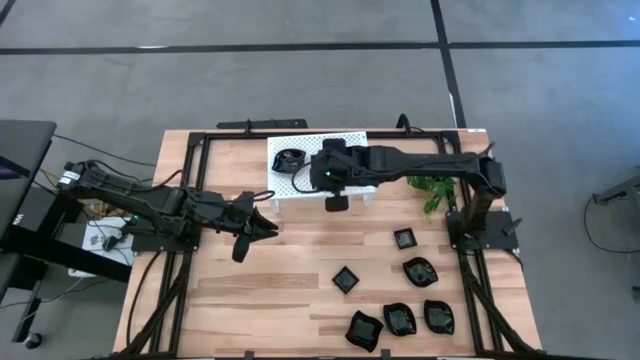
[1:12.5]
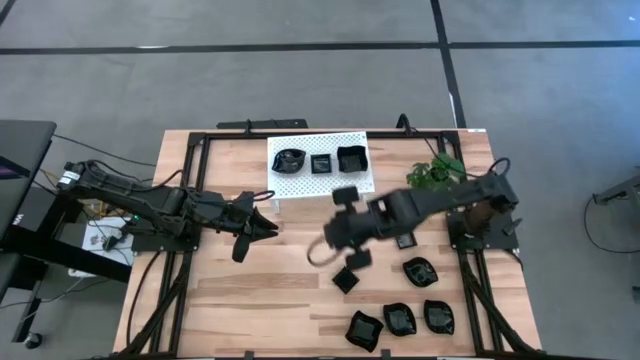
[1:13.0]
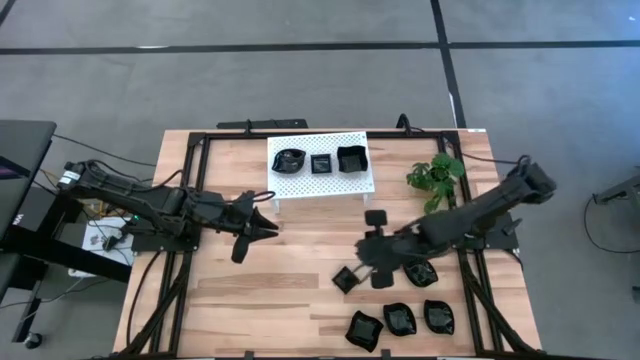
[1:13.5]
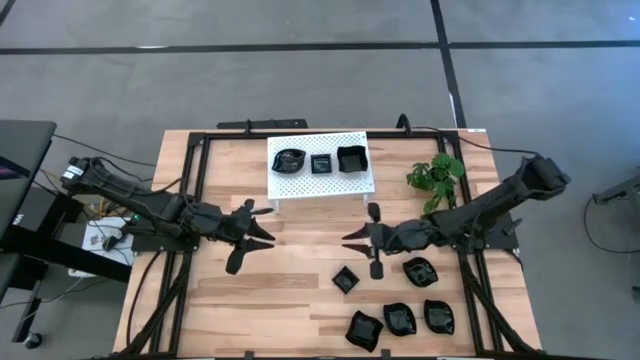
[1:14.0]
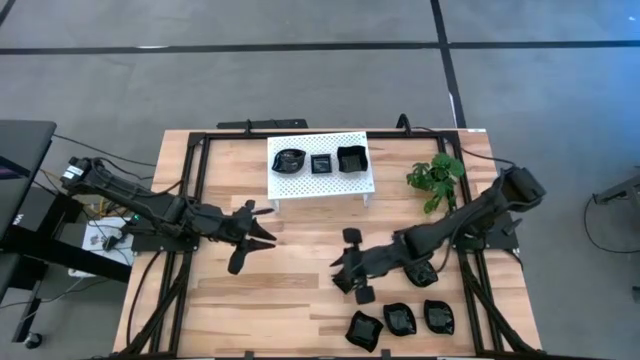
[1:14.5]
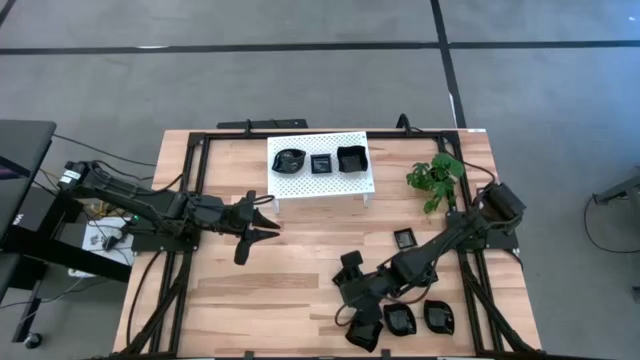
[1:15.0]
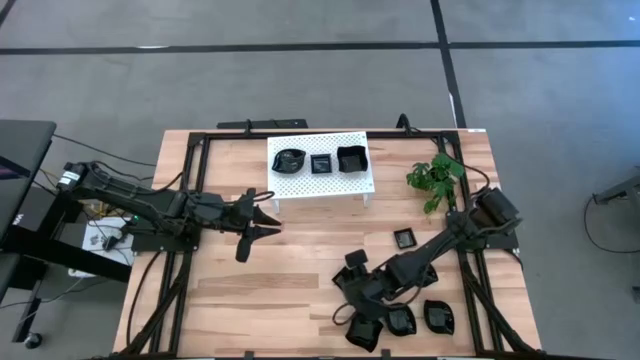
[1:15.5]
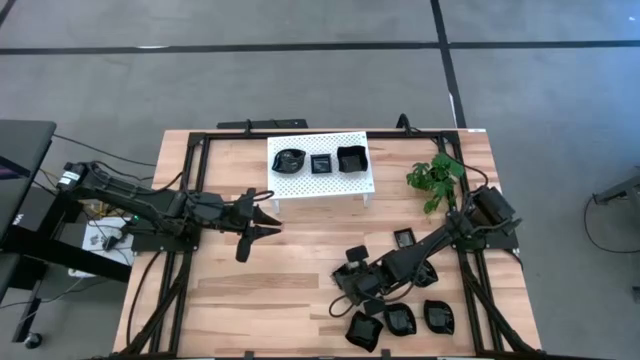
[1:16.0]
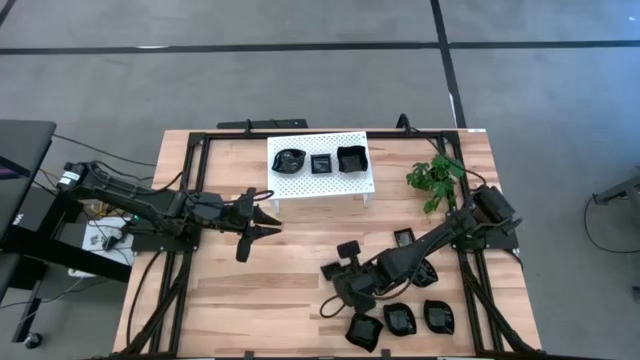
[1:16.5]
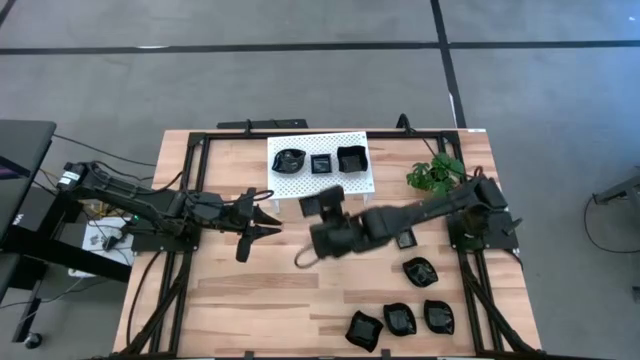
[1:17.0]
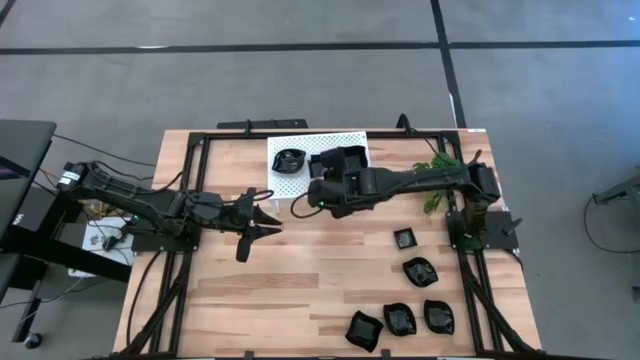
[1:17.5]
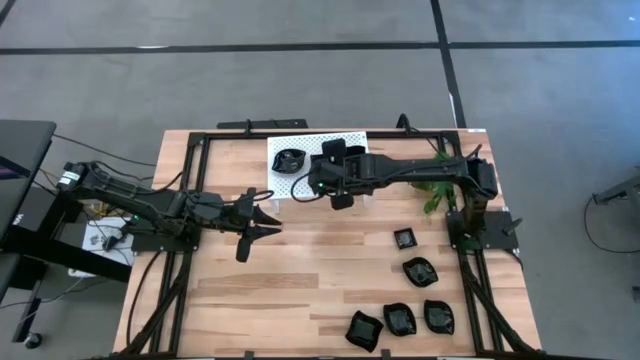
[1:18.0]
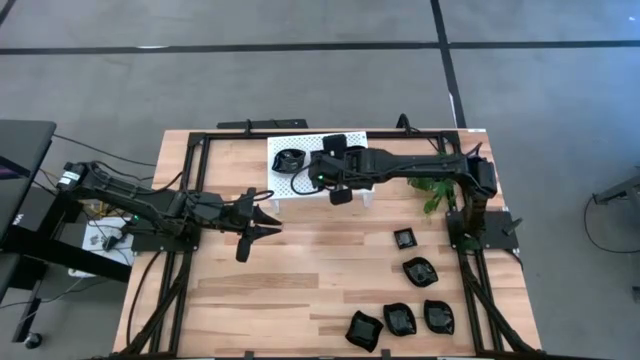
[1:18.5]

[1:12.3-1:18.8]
Task: Pick & Place Mini shaped plates
Stack the square plate on top of the square plate on the shelf

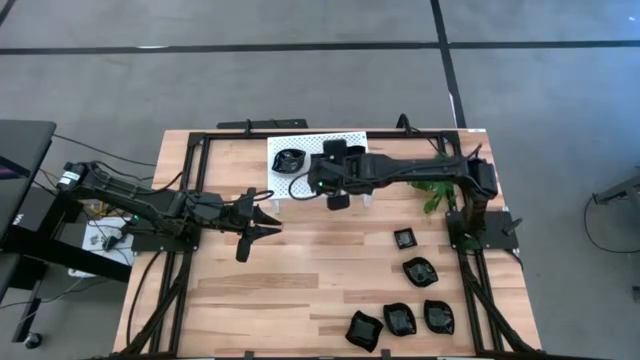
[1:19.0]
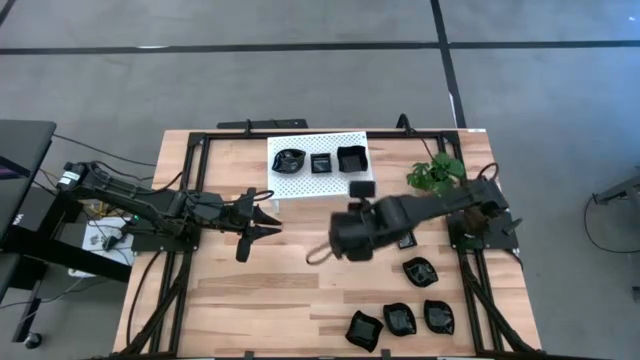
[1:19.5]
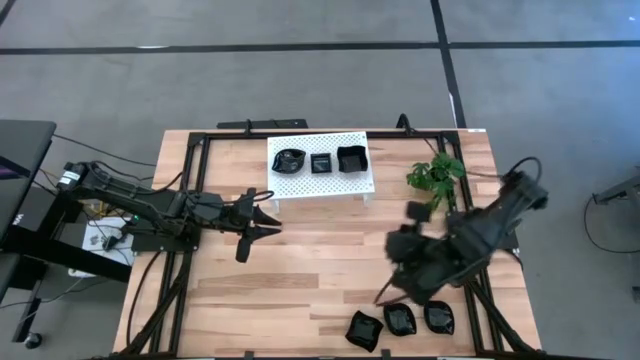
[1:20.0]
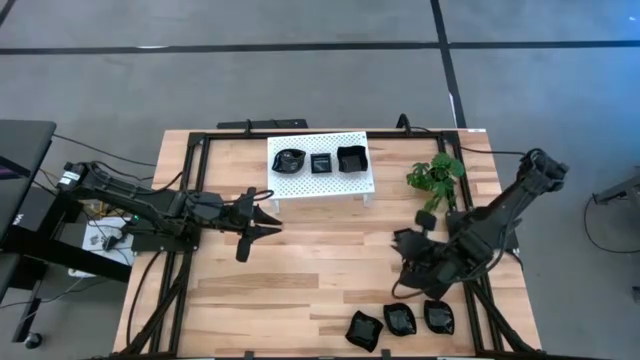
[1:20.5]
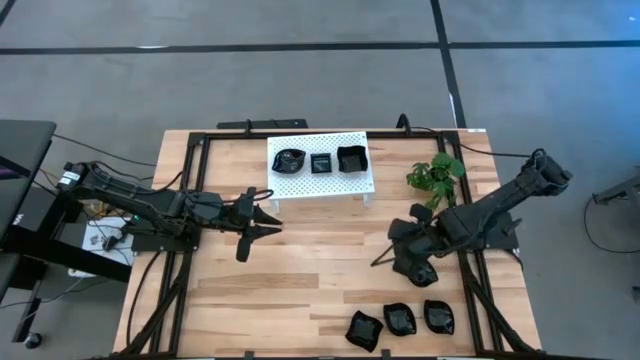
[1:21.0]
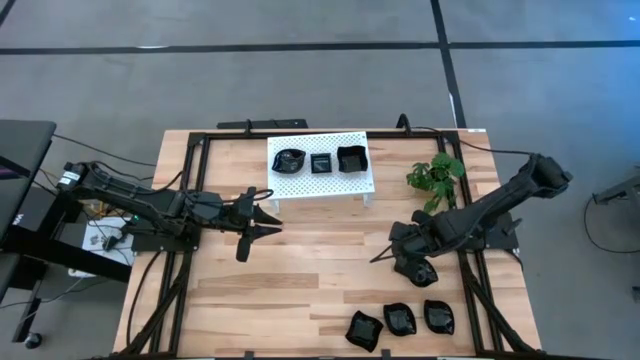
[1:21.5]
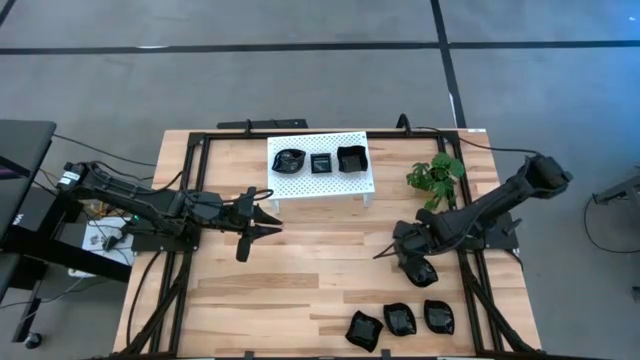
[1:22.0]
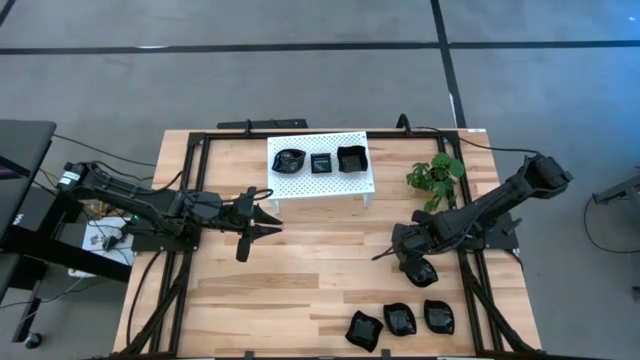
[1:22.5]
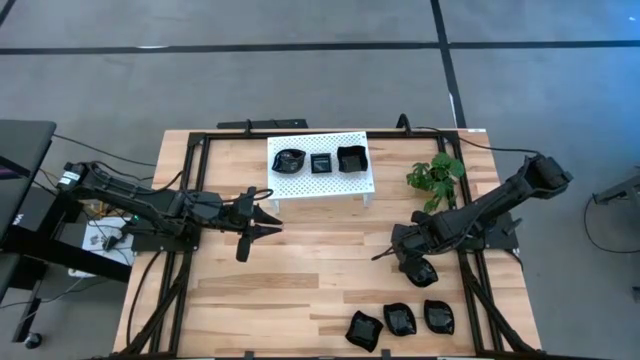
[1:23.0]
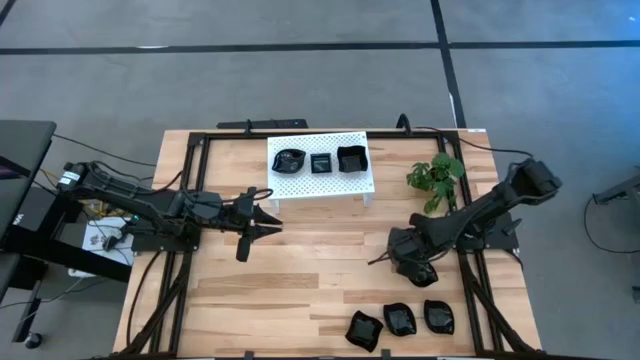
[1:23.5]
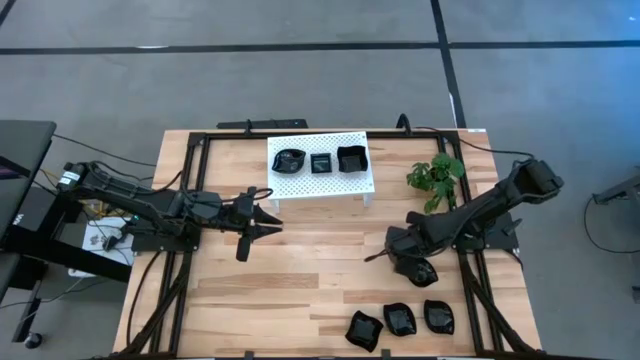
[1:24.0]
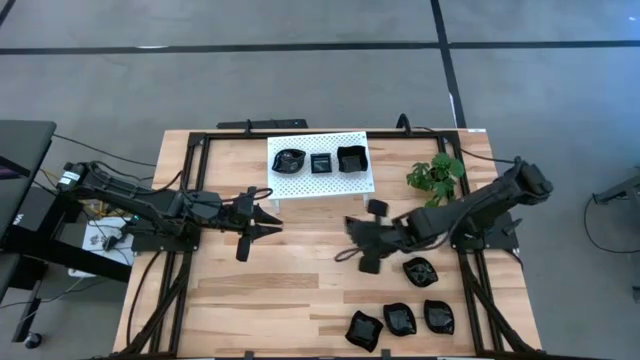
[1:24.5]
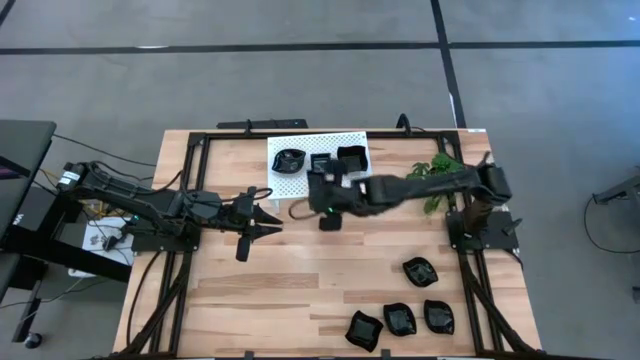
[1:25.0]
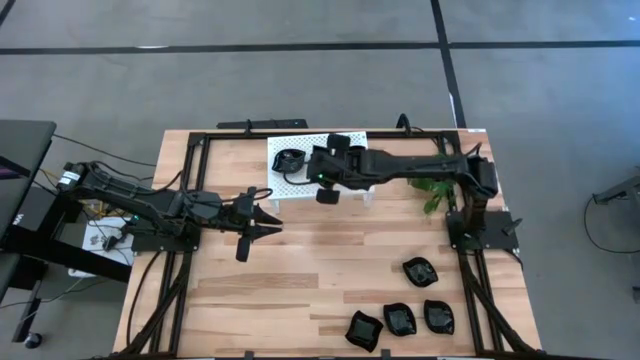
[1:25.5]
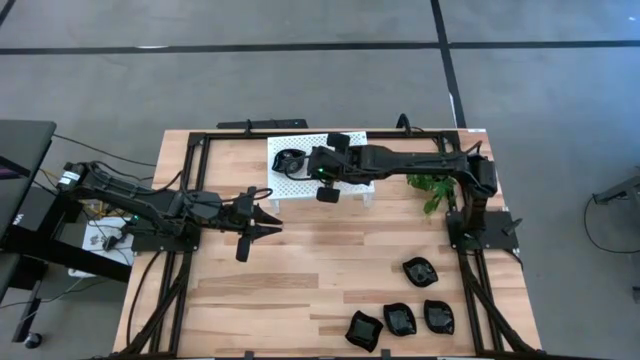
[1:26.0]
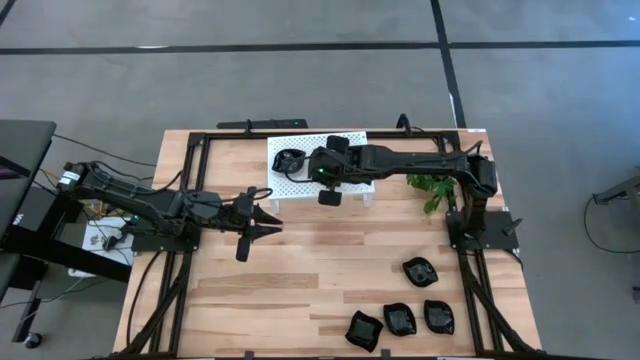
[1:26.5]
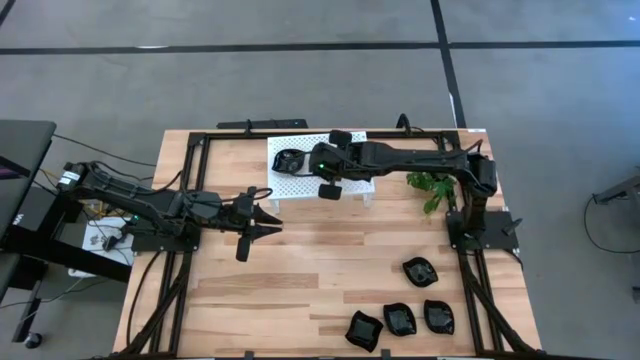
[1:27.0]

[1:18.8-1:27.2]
Stack the square plate on top of the square plate on the shelf

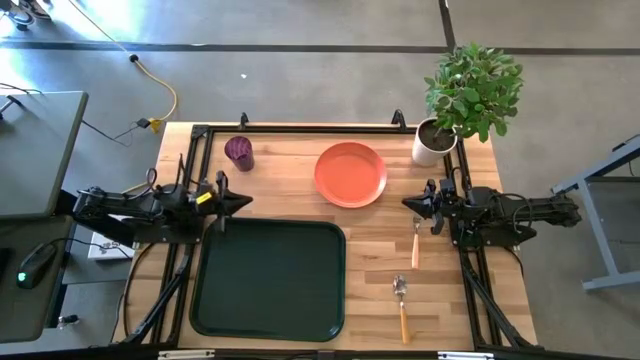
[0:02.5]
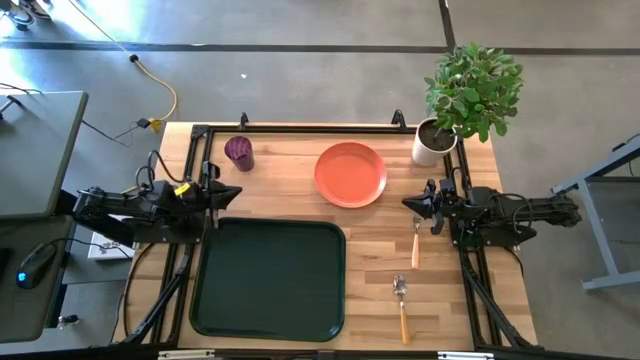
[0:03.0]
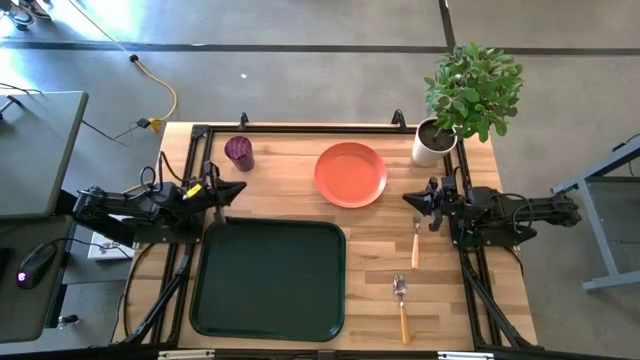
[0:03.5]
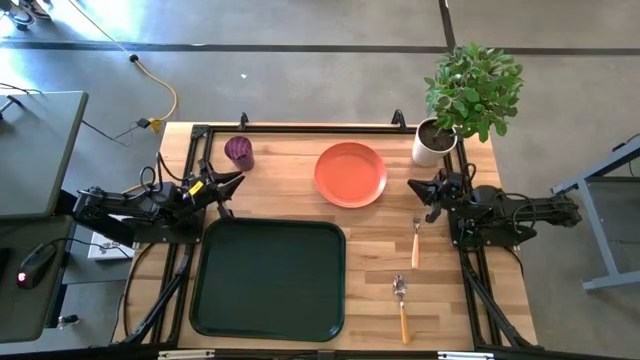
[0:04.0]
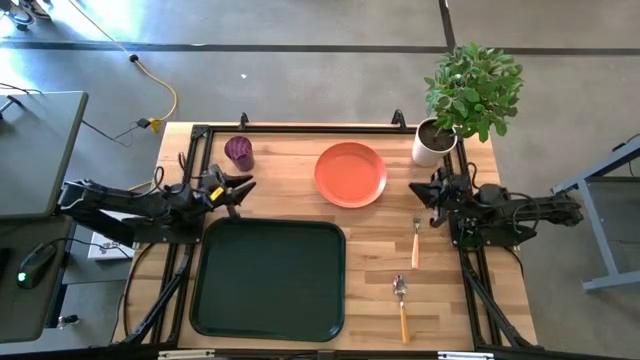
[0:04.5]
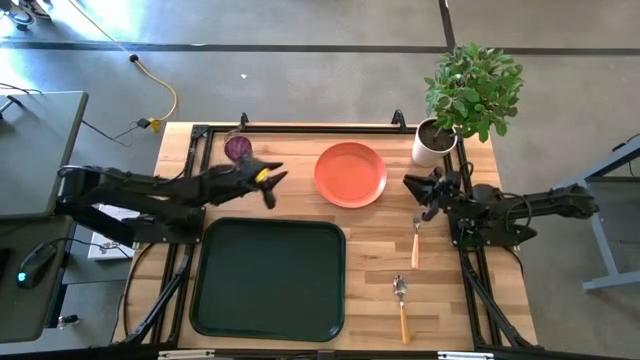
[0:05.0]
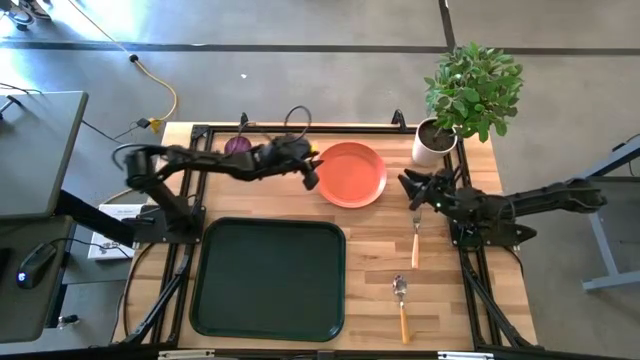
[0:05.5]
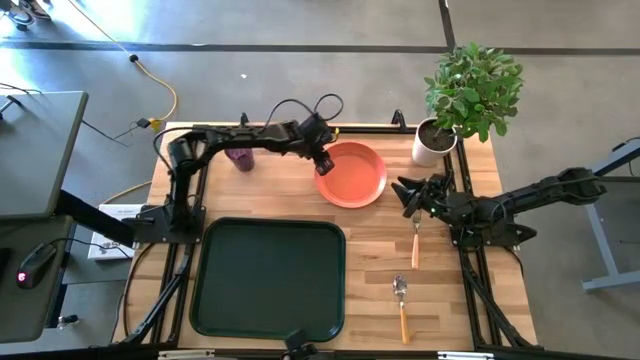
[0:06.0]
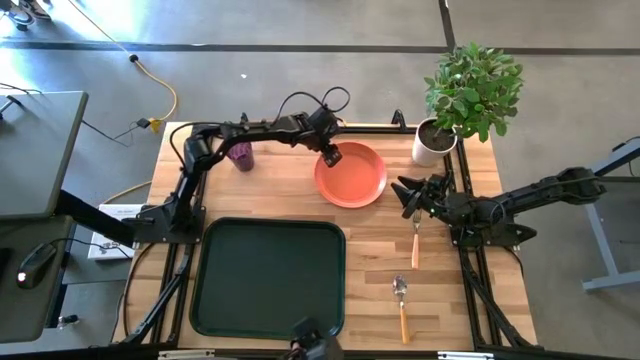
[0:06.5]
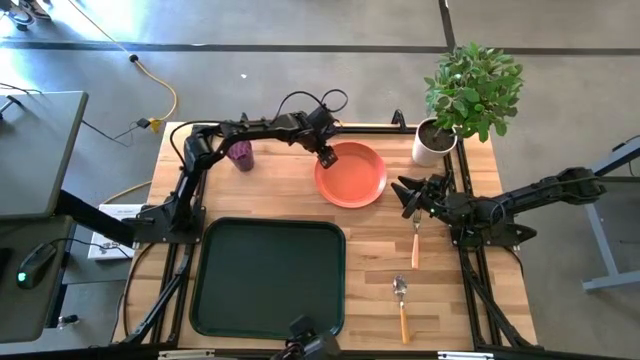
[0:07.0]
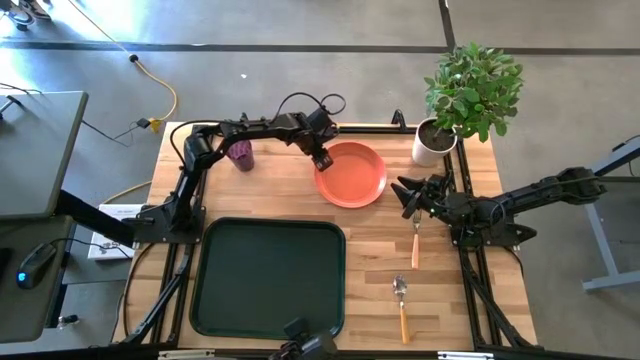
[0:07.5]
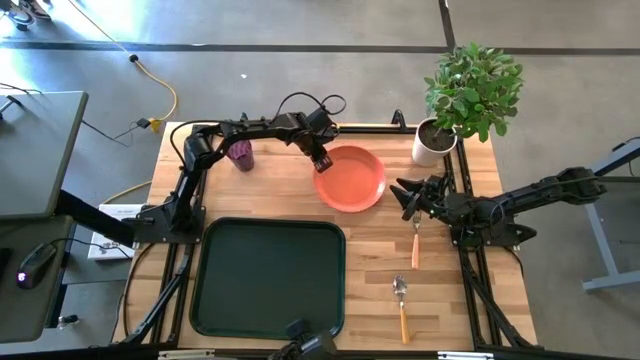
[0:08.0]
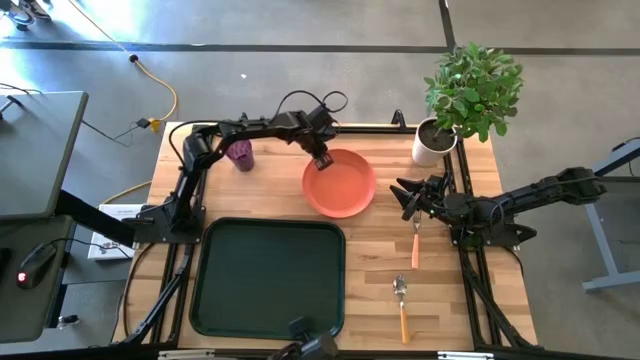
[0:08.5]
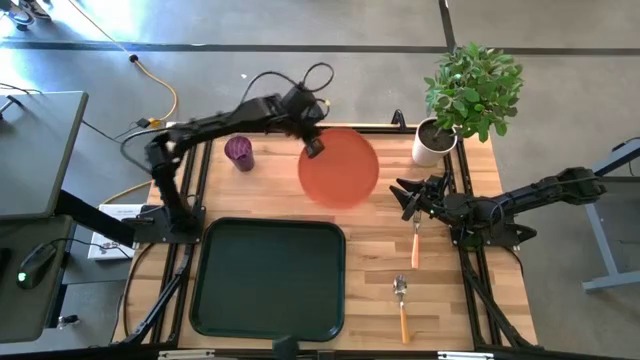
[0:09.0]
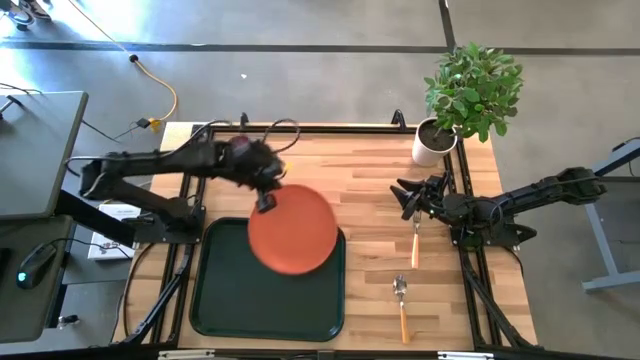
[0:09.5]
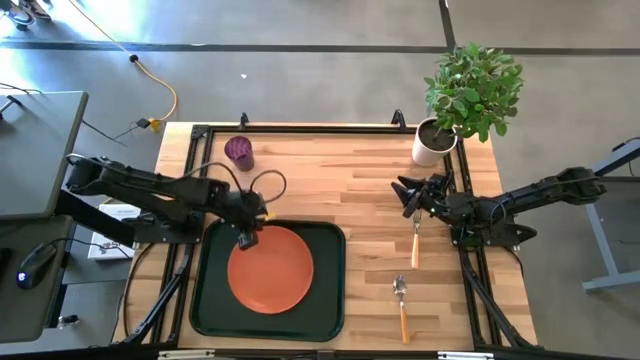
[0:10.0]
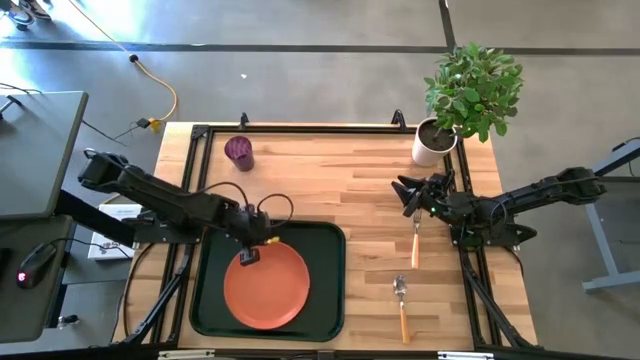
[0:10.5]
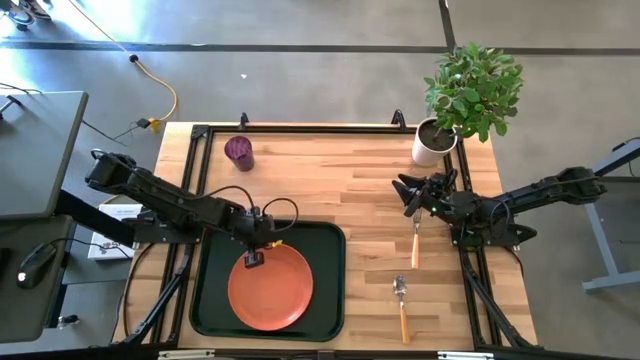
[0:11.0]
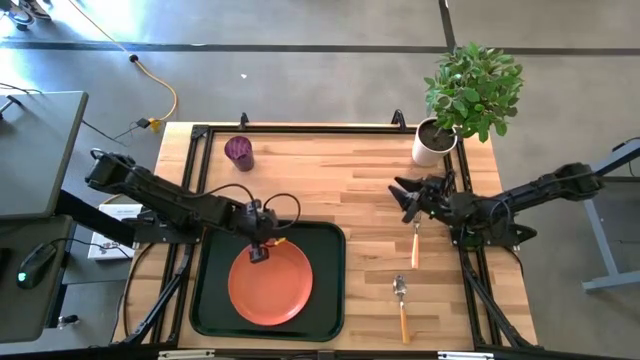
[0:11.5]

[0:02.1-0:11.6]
Task: Pick and place plate/cup/fork/spoon on tray
Put the orange plate on the black serving tray
